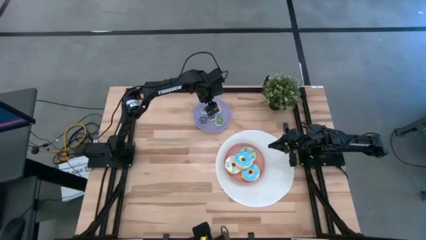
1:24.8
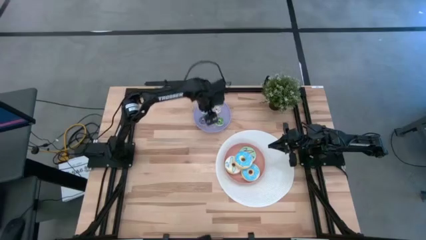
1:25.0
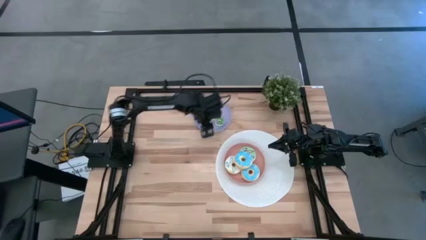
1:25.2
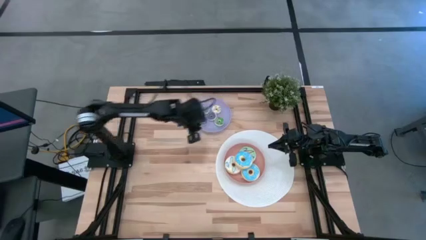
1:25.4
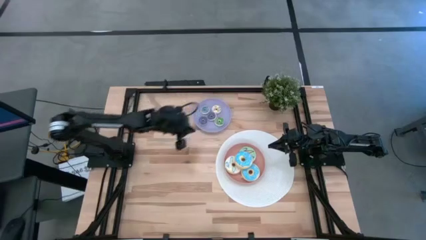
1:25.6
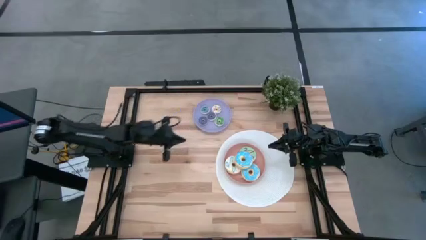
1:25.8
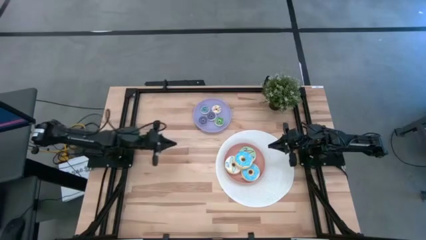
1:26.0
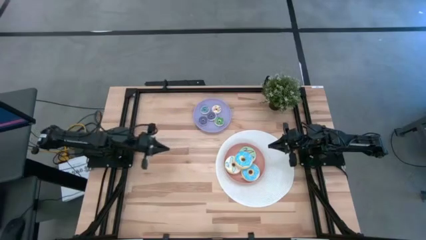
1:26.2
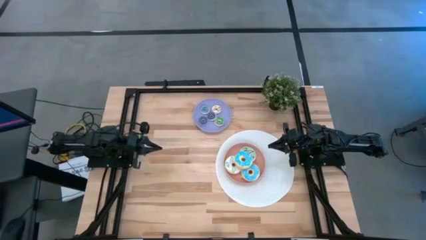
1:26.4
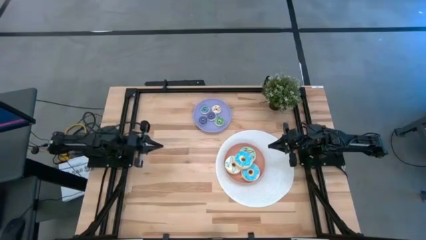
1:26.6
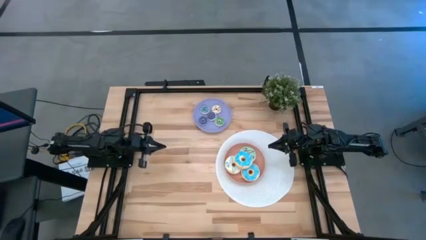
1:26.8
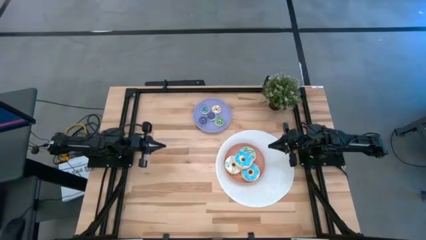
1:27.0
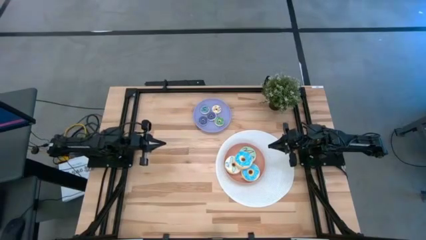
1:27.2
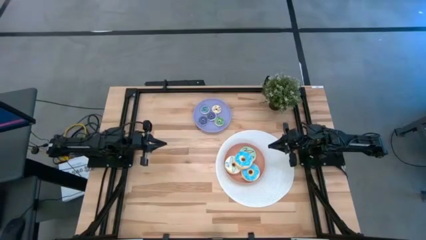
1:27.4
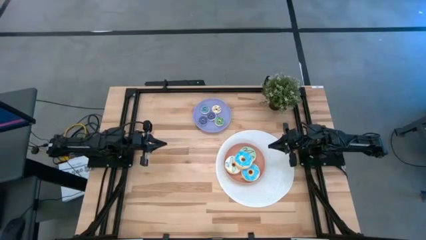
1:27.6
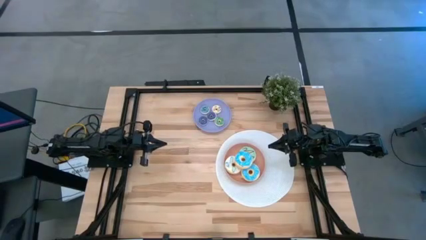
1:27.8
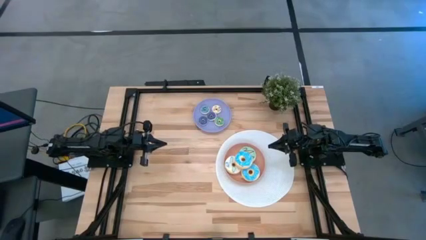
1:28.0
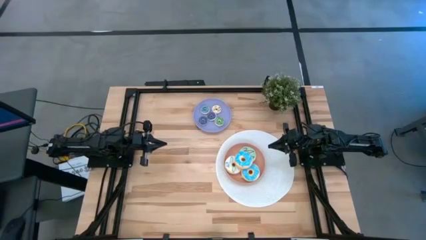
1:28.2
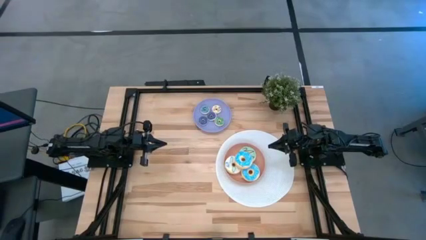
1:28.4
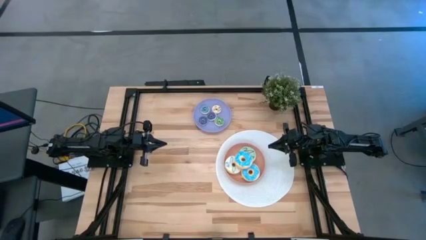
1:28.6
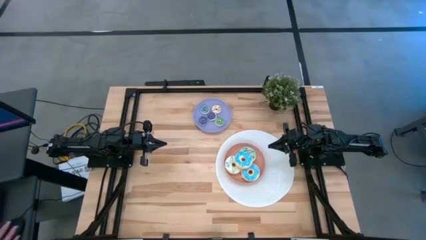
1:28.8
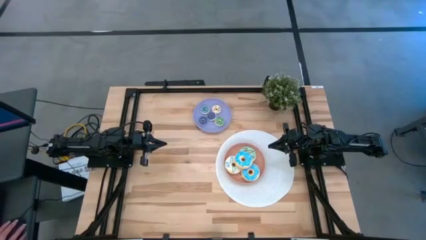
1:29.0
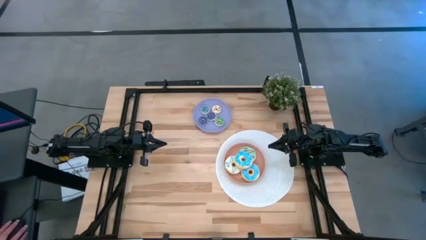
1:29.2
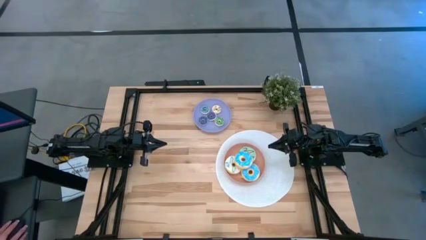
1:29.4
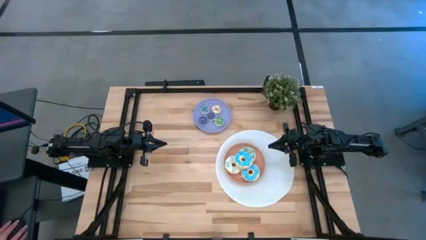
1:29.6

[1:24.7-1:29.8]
Task: Pick & Place donuts
Return to home position

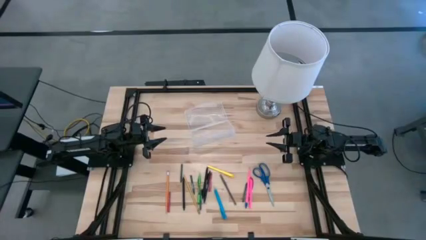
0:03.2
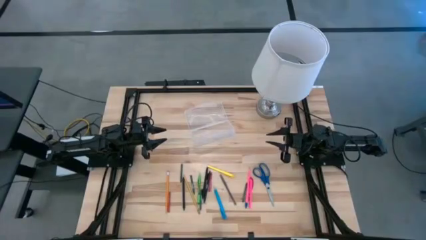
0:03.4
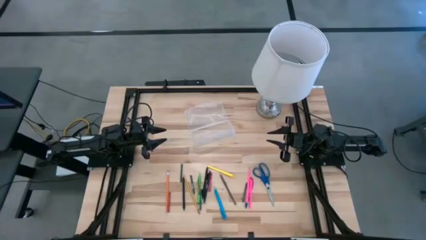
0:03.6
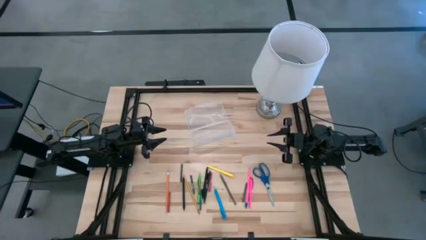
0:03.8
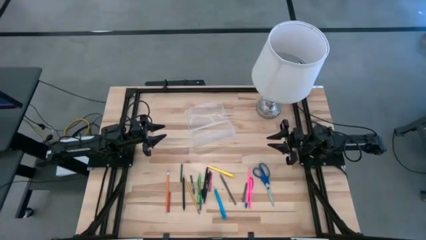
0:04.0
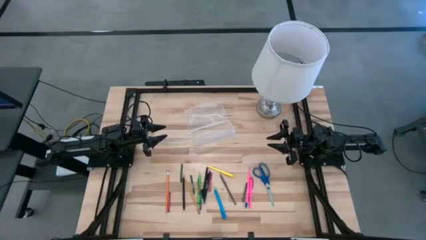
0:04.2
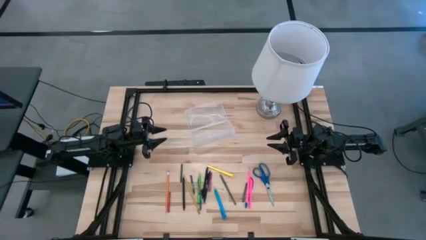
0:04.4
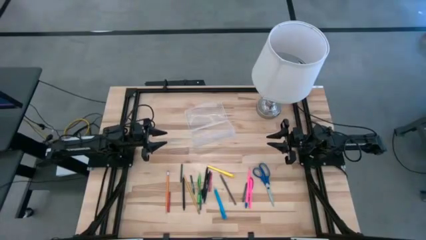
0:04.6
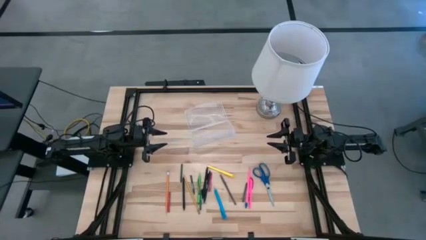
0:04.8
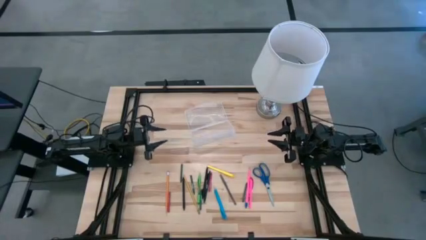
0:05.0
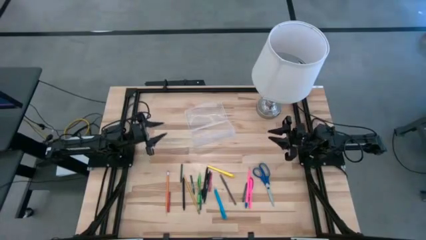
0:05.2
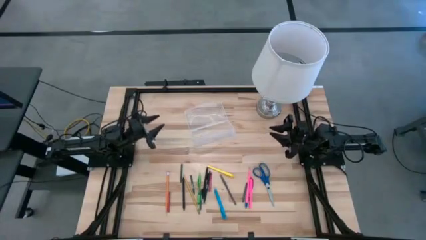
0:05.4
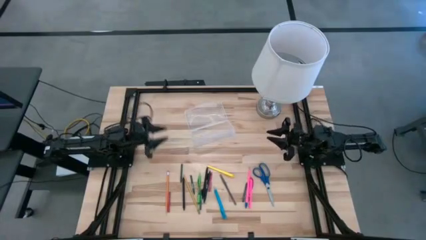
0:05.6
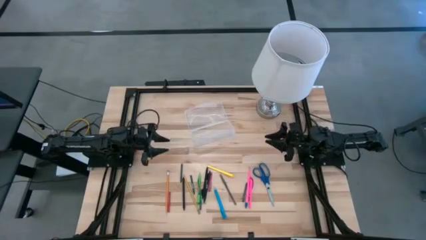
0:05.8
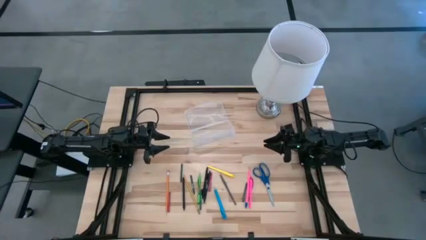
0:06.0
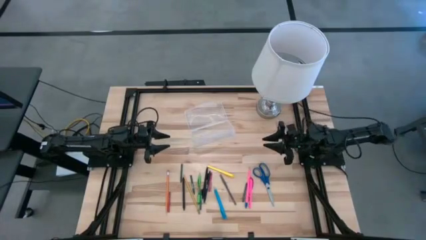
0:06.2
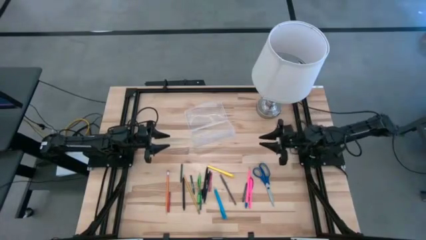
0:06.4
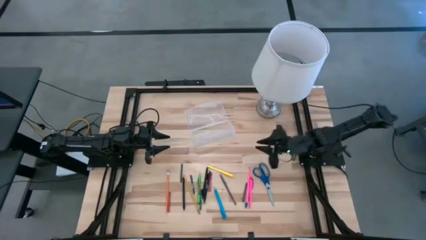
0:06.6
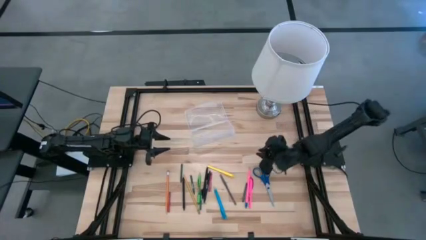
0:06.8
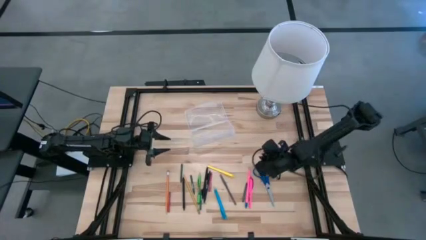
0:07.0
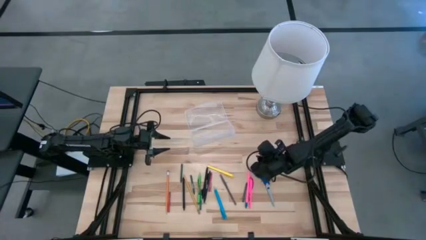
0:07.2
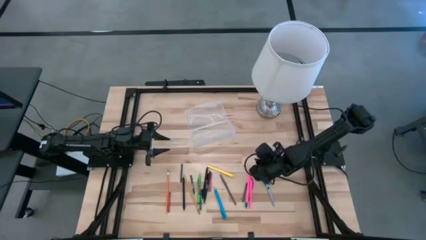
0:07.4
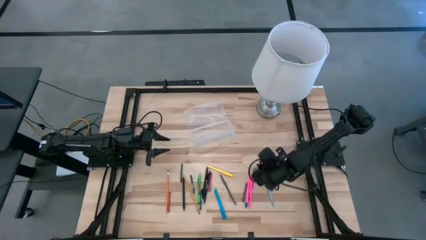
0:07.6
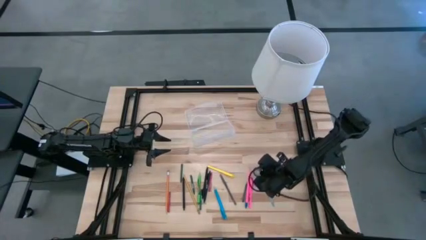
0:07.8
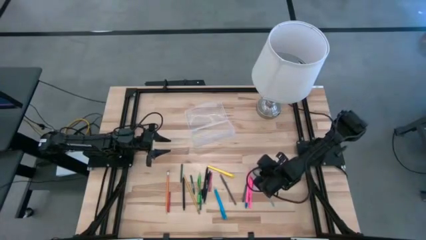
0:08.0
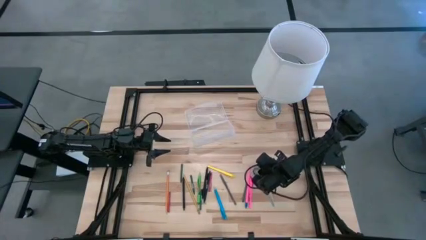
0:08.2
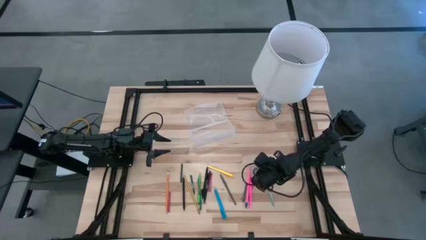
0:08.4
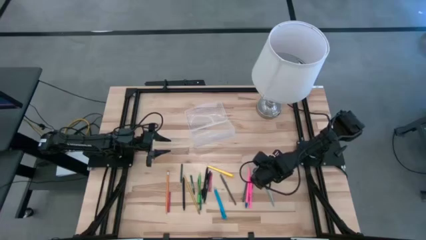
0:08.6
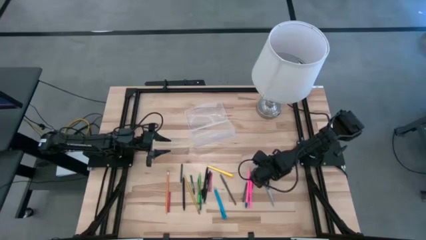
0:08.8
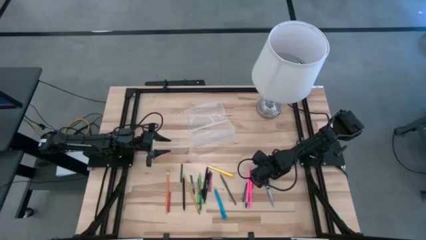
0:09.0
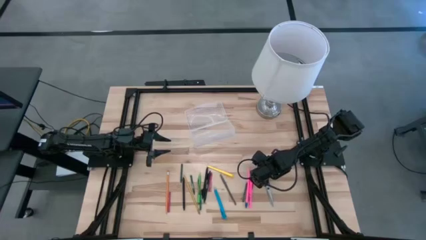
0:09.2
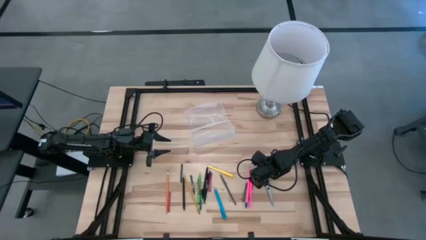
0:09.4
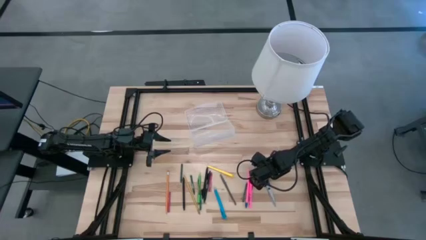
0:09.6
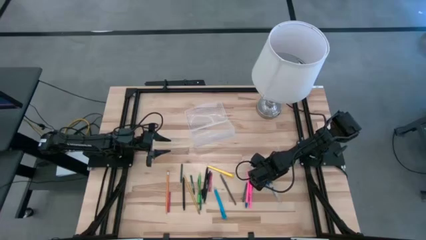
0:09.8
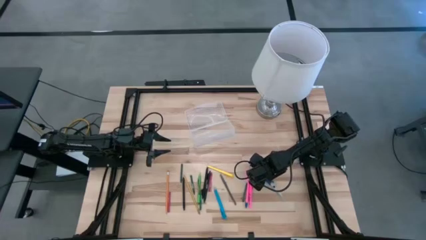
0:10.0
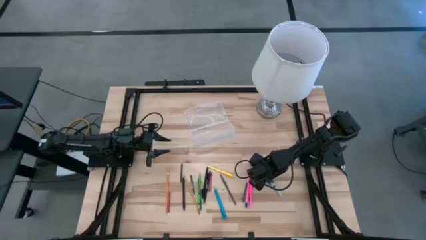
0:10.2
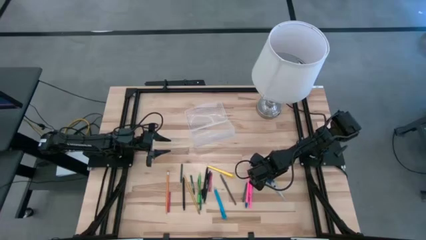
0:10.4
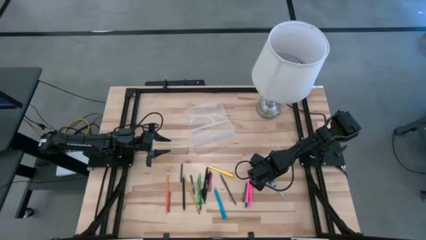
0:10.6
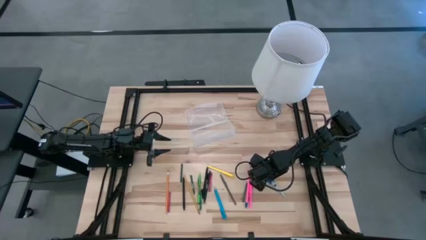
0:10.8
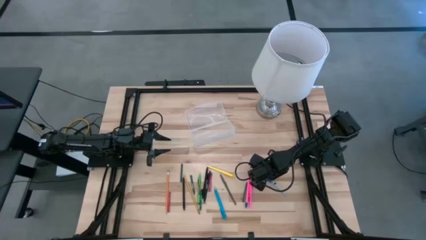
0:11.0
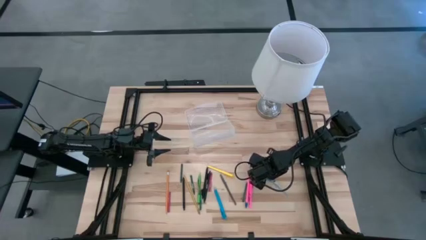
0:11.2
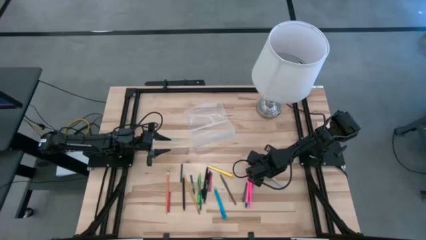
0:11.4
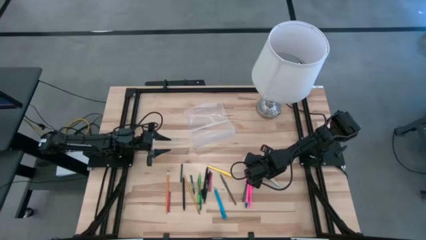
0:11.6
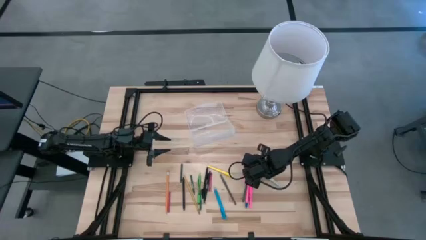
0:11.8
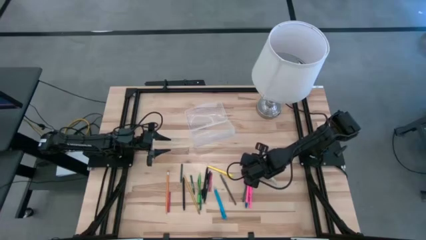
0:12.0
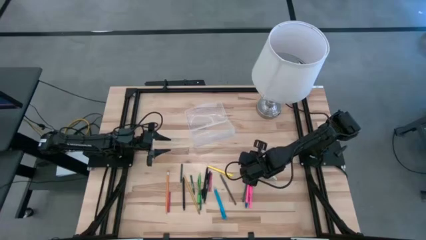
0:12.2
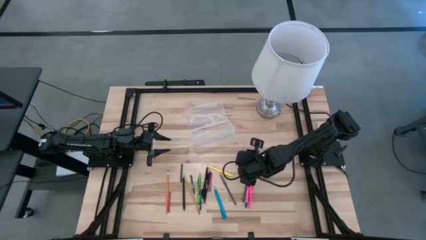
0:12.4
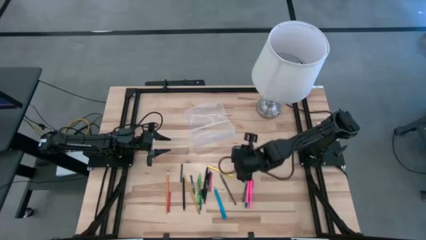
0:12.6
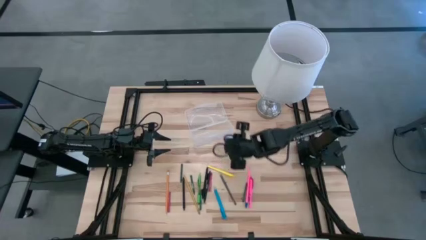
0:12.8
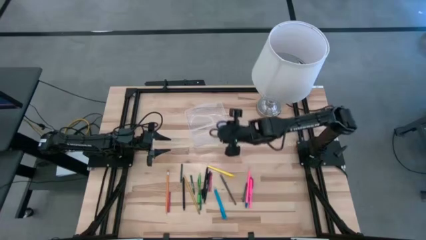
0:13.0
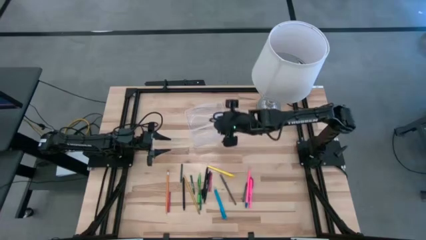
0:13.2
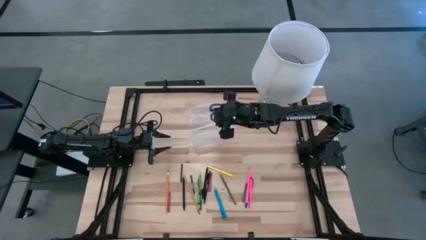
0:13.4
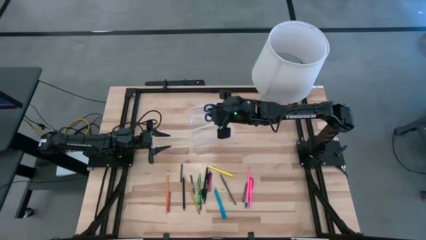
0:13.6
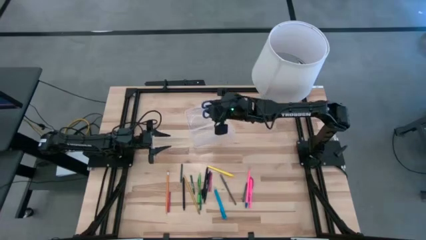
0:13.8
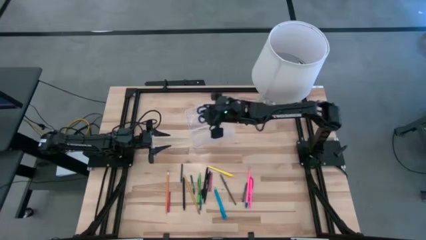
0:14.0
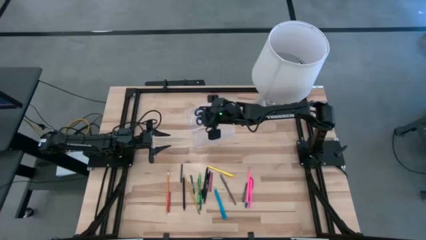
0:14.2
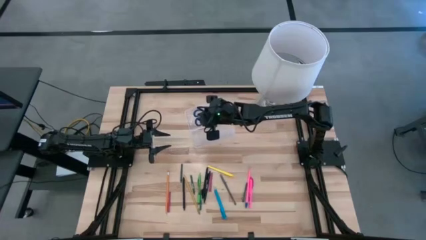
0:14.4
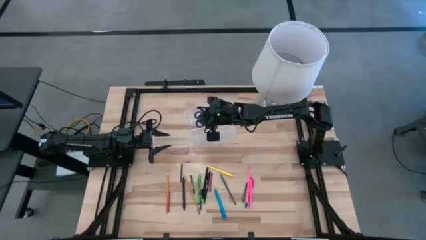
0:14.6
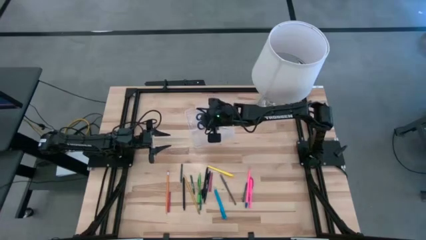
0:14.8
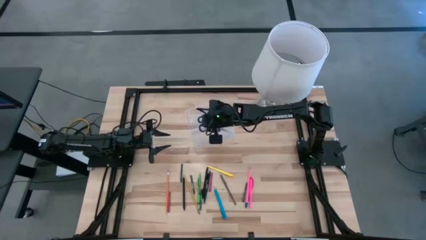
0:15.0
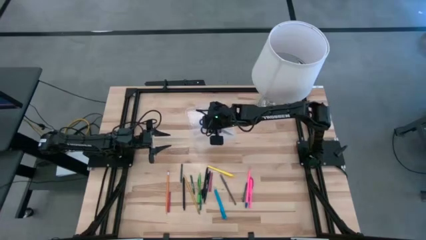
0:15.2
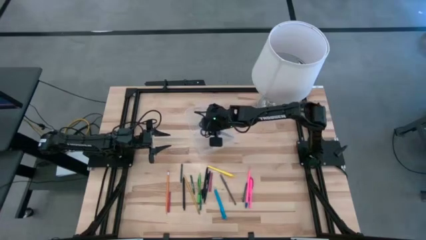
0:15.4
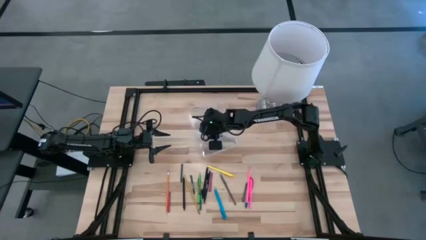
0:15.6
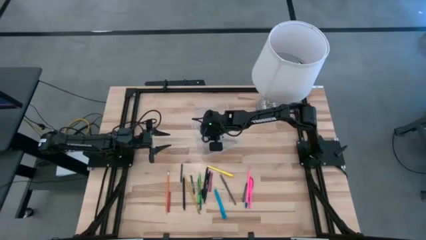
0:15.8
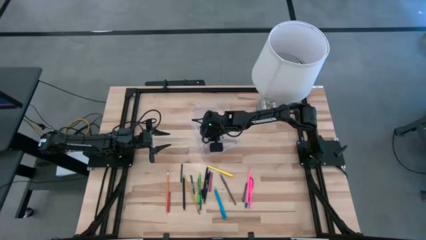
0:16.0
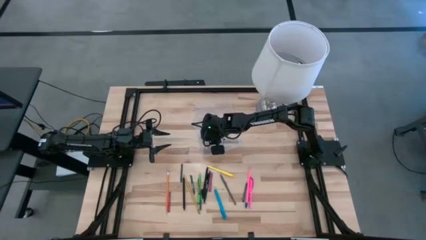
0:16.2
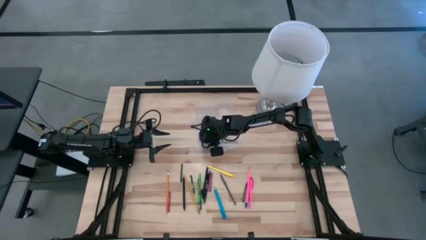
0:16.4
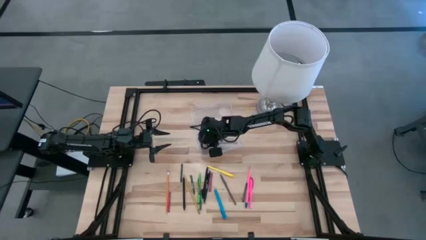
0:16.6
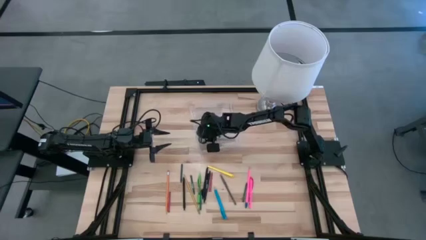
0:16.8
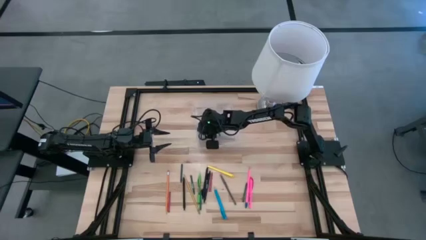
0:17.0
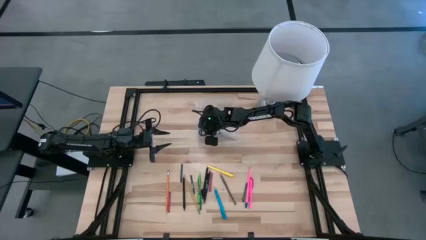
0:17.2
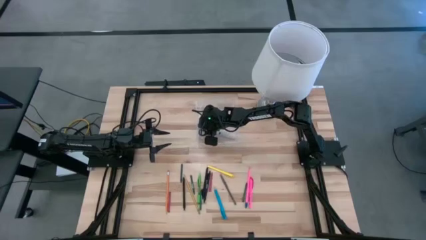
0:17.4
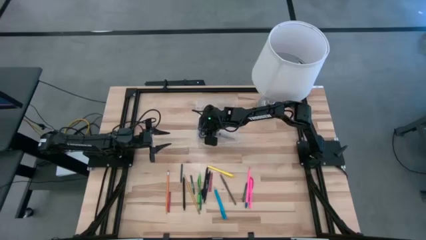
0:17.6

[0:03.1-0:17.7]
Task: Pick & place school supplies into a supply box
Put the scissors into the supply box
